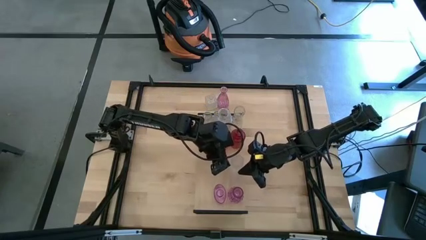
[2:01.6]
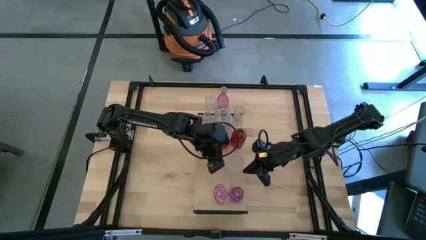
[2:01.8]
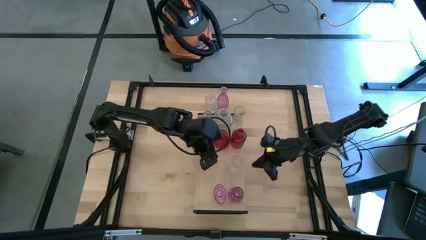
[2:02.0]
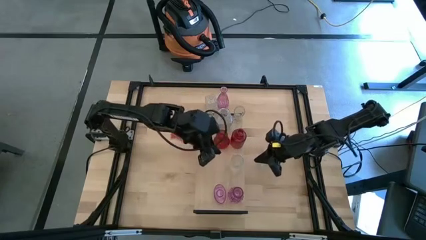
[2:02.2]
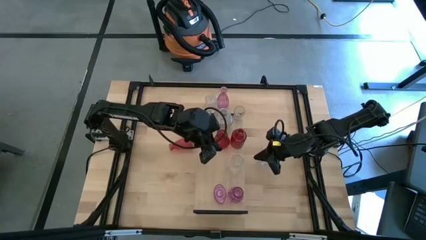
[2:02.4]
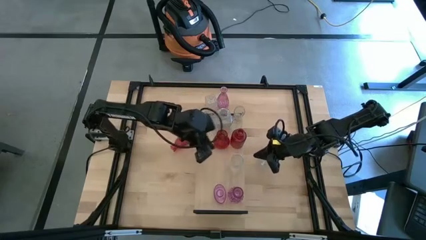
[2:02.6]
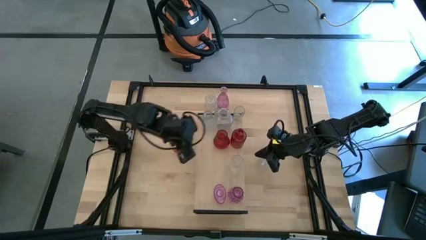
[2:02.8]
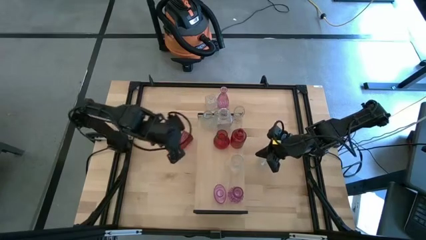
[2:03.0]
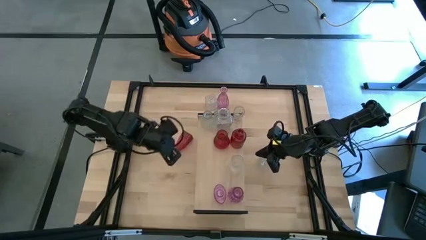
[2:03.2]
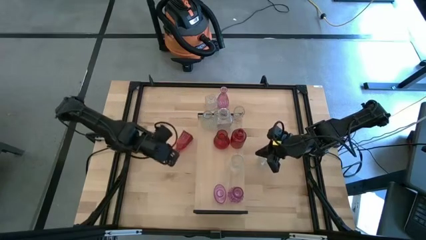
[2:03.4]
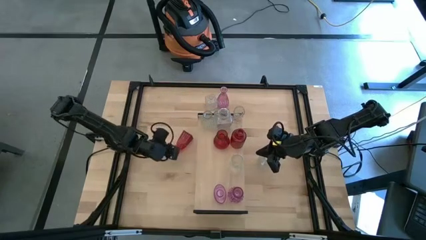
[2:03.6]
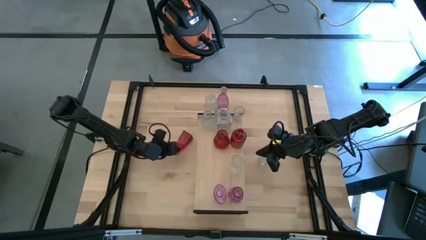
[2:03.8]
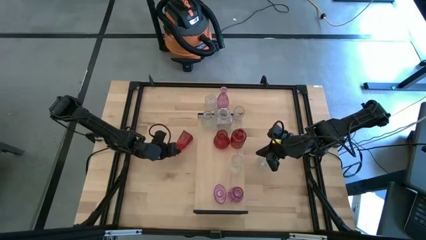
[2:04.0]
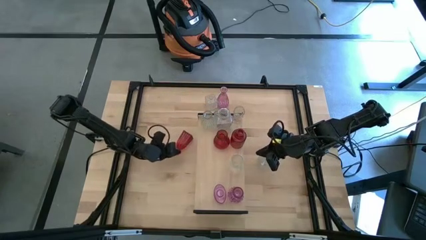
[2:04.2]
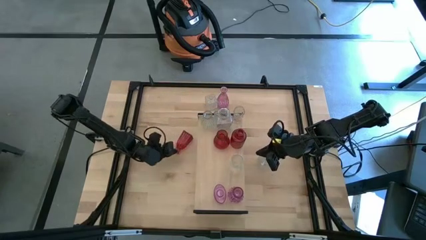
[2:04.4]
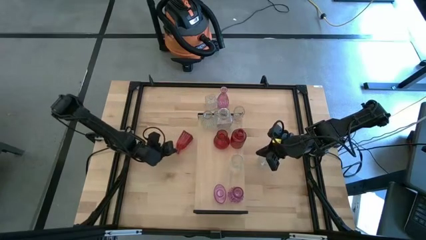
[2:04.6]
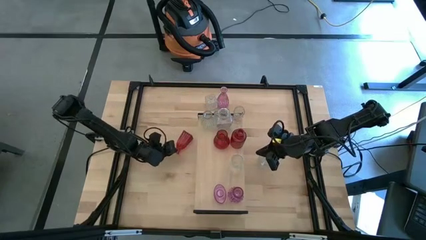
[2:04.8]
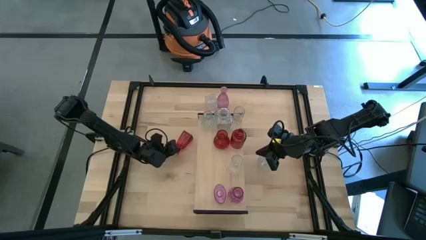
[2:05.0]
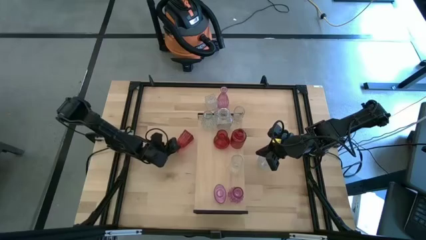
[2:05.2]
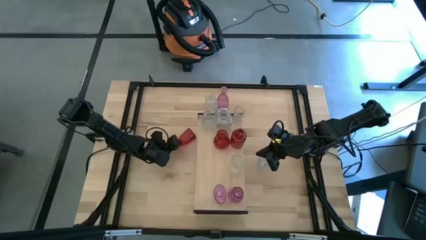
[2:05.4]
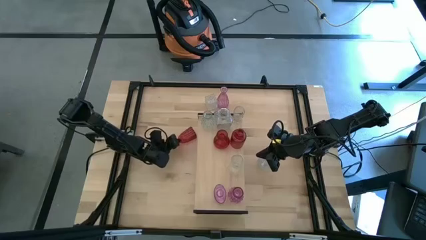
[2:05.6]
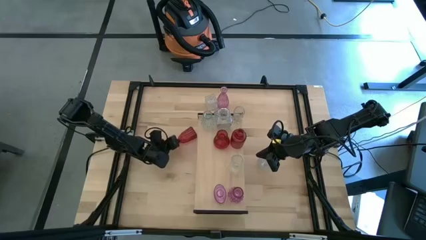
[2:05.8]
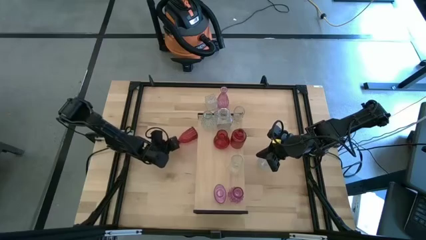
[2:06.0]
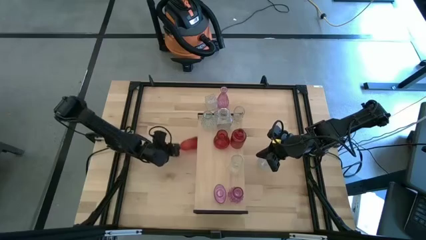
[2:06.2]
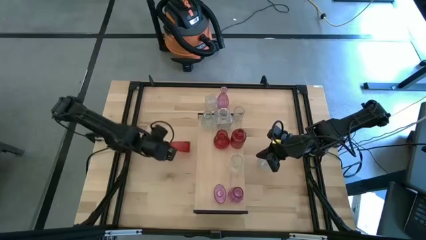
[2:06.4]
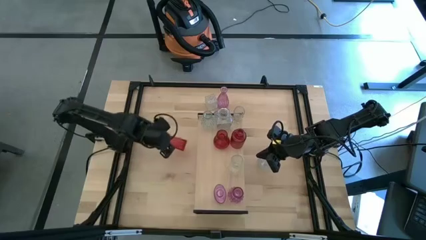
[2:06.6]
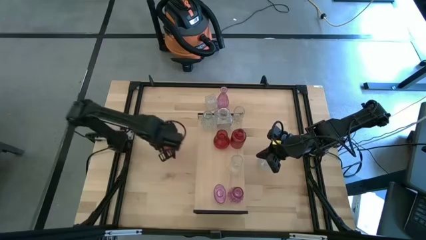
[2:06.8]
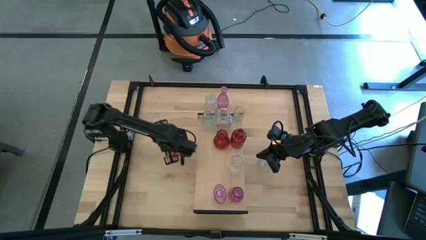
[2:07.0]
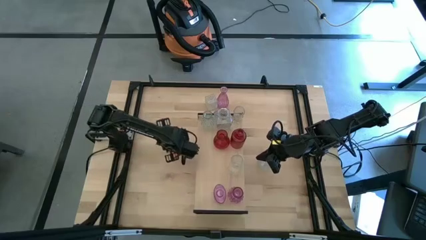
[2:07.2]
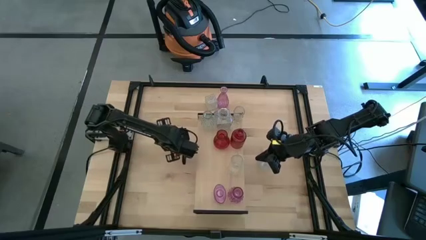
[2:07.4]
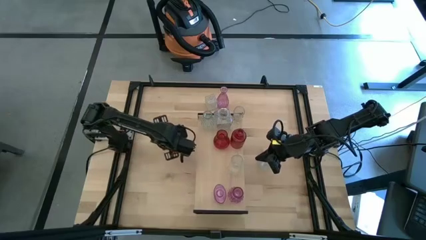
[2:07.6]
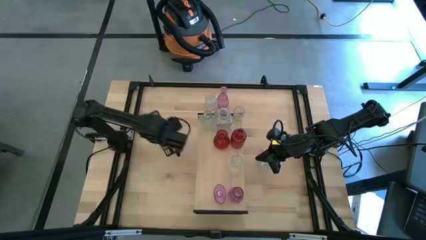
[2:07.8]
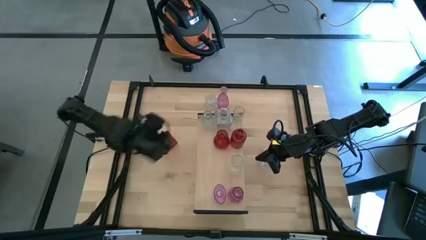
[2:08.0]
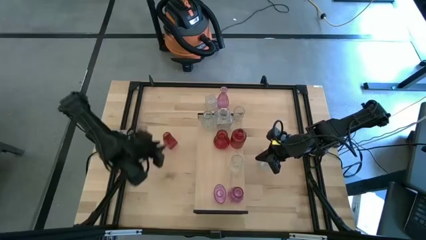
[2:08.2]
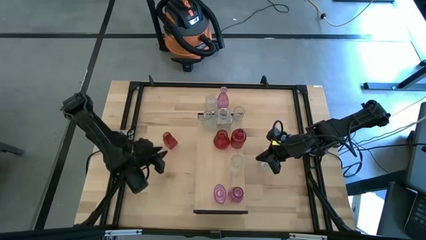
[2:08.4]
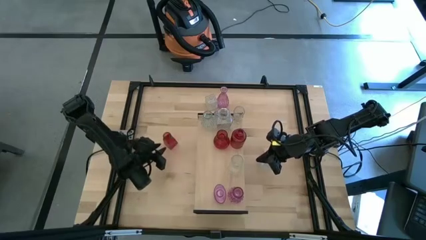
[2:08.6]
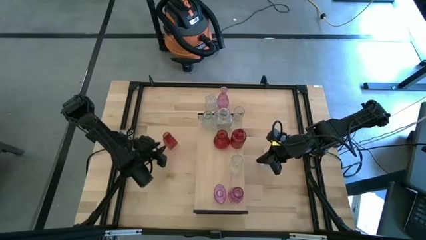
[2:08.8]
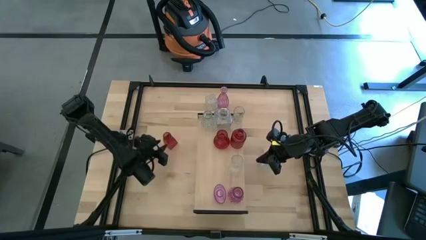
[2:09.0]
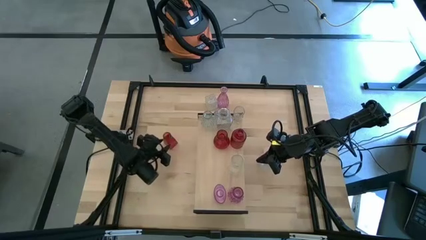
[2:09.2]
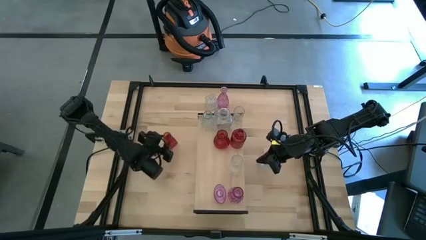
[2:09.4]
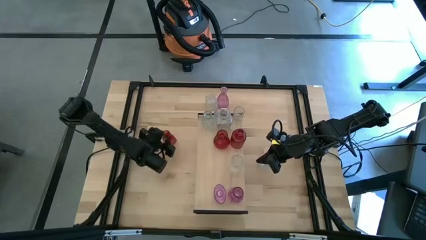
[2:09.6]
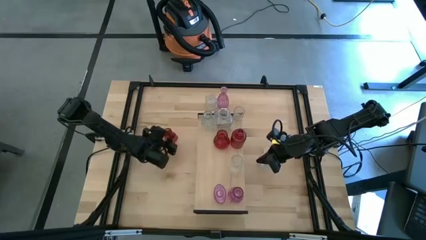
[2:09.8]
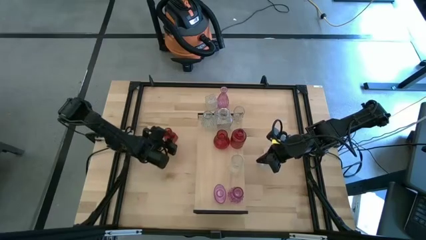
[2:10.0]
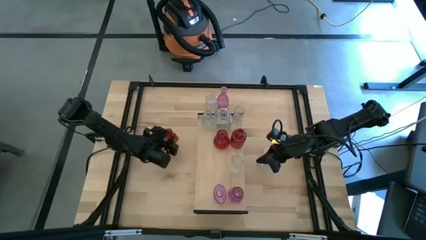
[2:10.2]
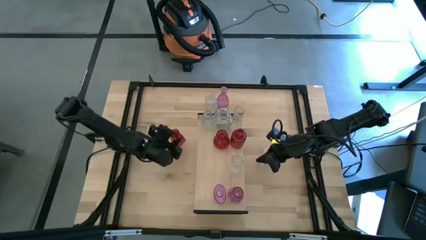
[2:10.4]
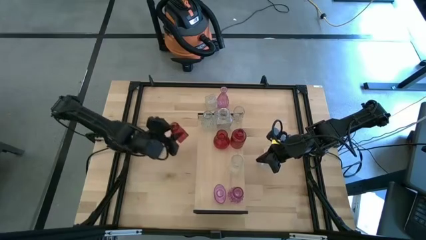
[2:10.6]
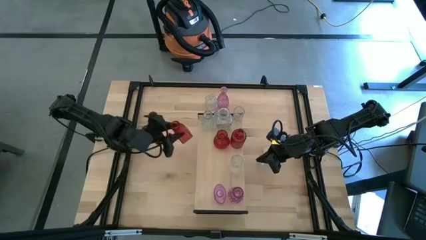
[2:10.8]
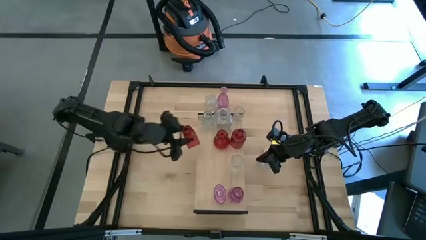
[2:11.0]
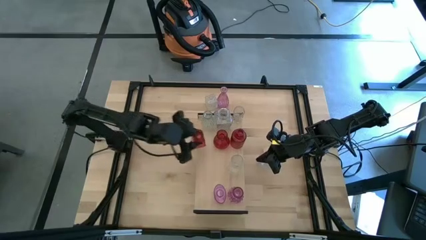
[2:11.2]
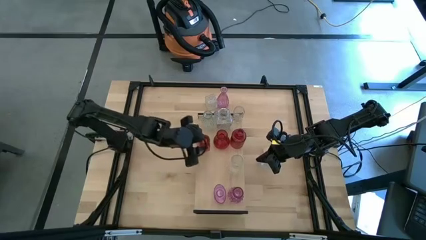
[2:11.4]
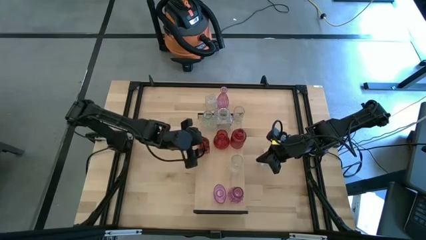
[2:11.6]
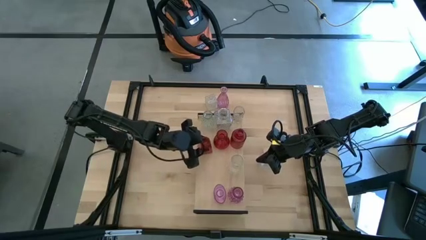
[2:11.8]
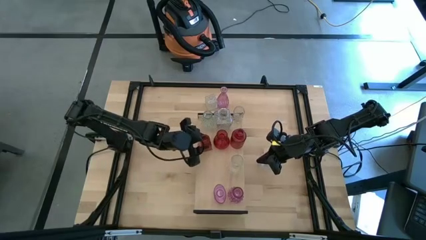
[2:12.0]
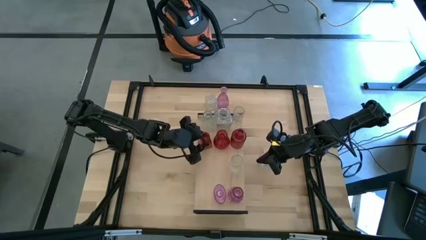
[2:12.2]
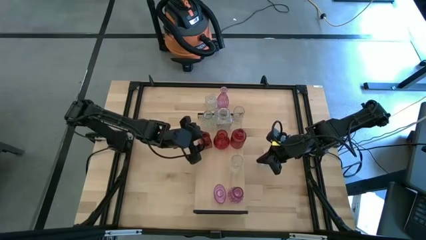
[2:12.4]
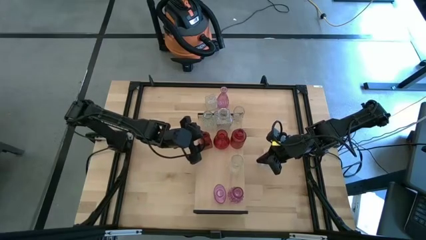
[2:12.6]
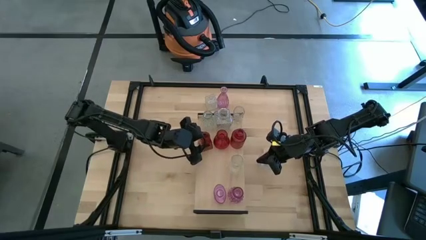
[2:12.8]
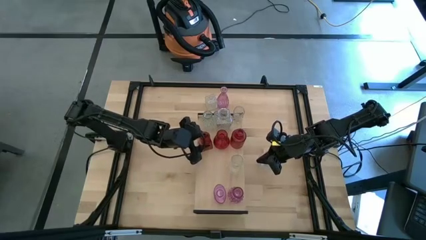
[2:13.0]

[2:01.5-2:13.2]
Task: sort vases onto shelf
Put the red vase on the shelf aligned with the red vases

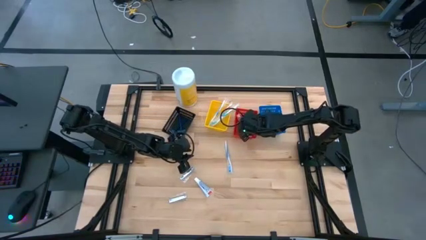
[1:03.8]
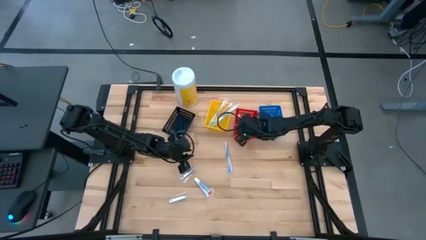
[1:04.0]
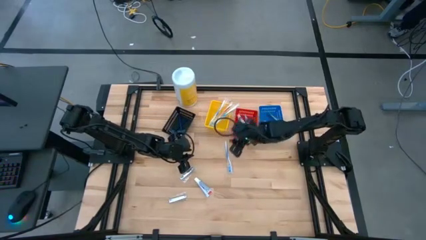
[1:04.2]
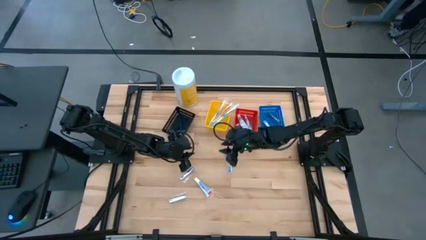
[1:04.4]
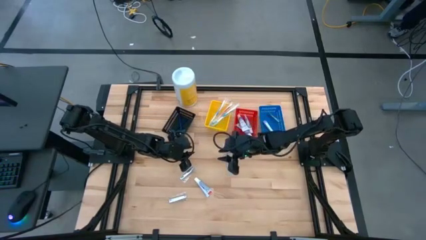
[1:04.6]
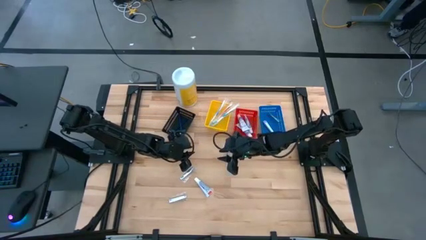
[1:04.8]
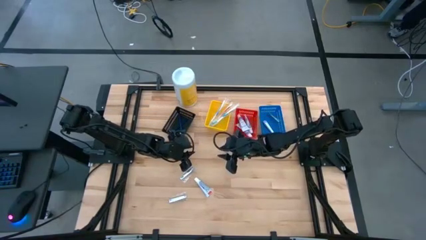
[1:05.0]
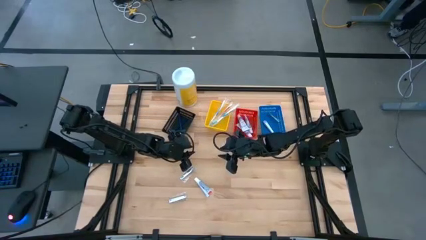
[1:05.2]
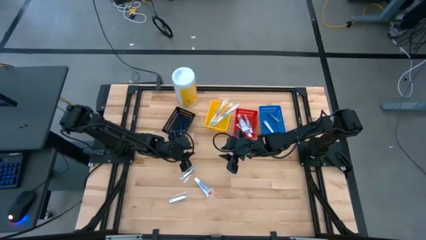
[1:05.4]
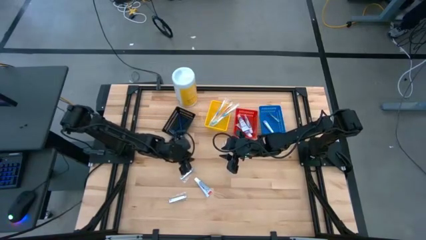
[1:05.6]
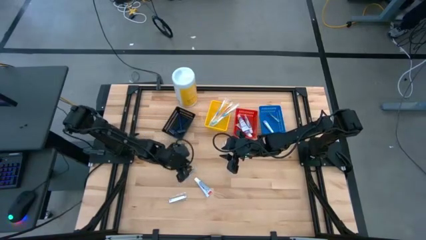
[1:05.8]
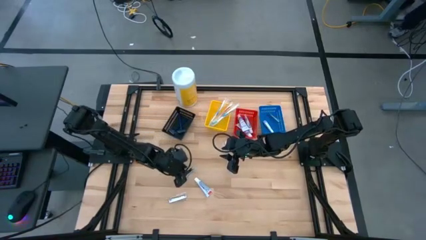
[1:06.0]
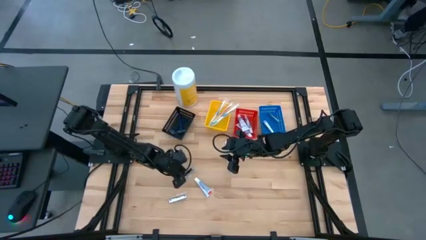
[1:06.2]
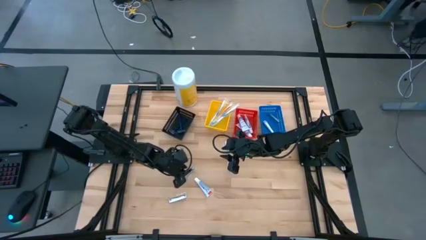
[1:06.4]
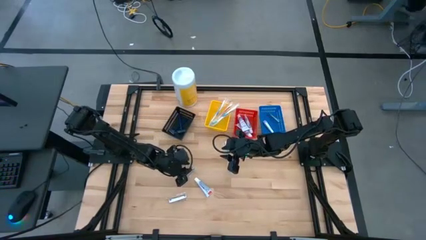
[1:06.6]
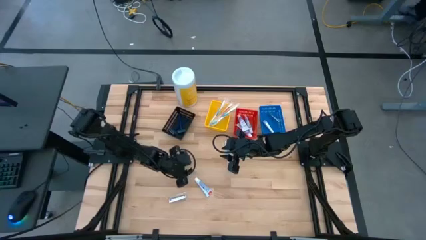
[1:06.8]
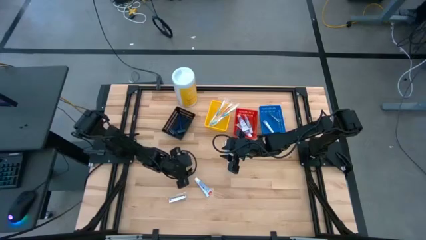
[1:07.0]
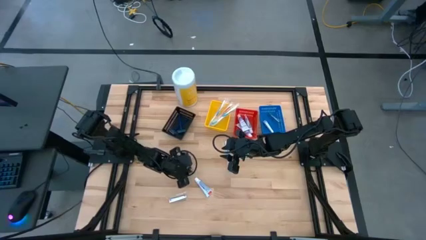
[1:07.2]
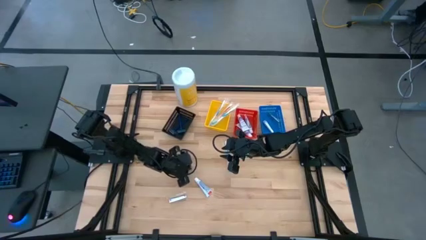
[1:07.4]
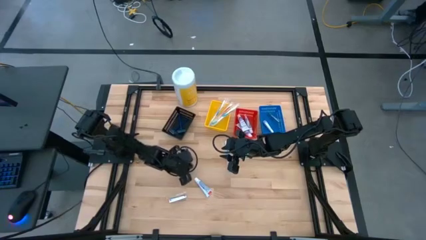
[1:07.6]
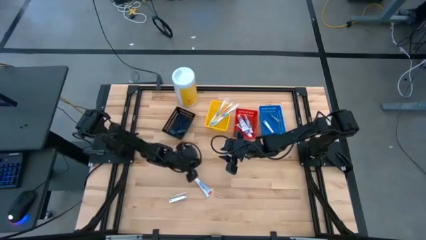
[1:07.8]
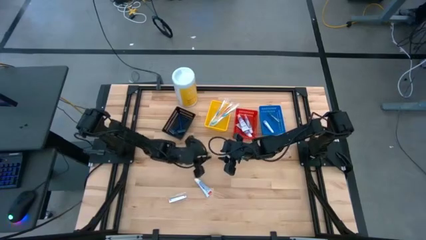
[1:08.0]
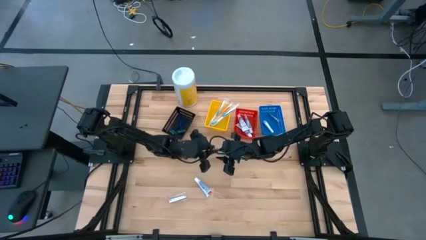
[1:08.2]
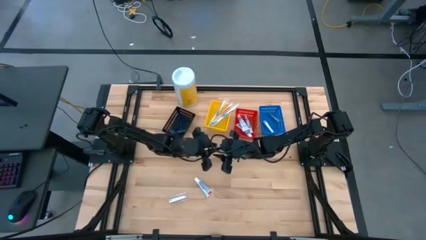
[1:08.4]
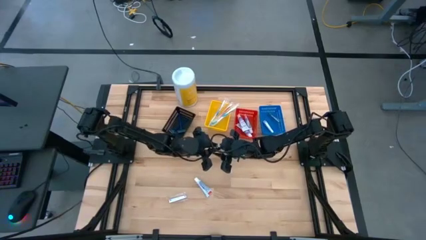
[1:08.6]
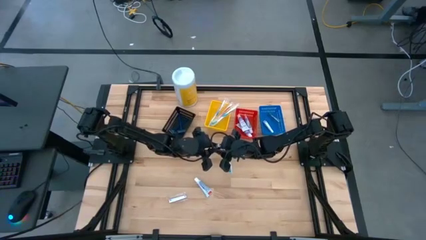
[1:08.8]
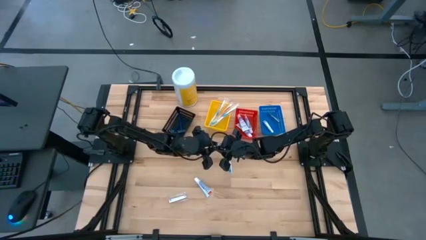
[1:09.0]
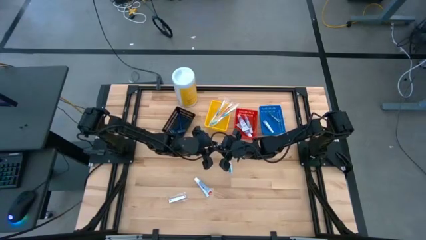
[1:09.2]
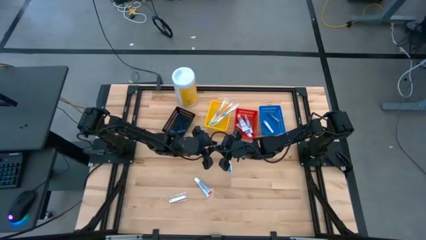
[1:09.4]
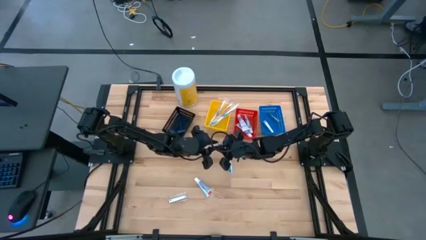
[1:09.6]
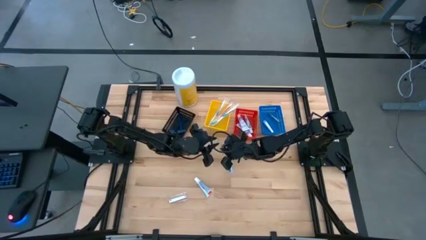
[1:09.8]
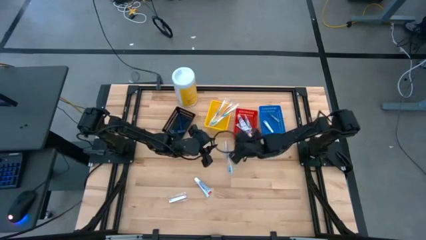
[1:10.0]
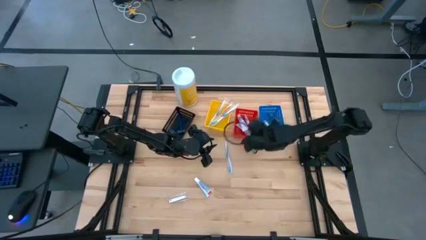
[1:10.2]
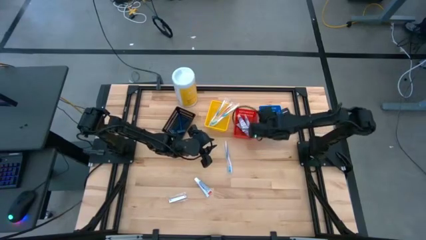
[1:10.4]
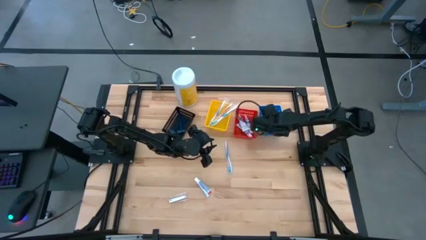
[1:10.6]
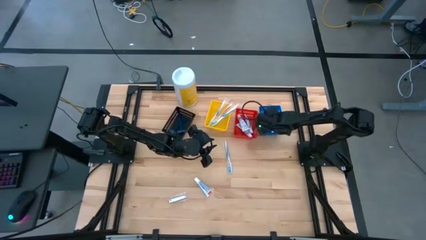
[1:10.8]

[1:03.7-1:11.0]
Task: Pick & Place Travel size toiletries
Put the silver nail cutter into the blue bin
